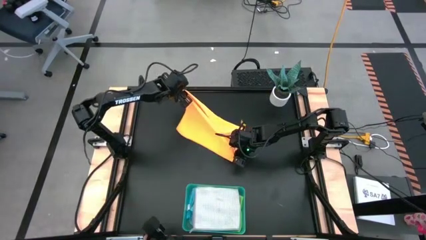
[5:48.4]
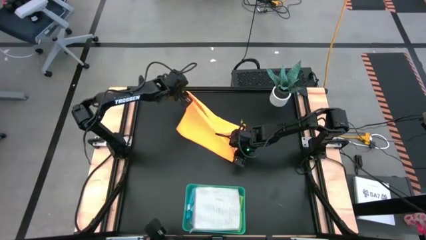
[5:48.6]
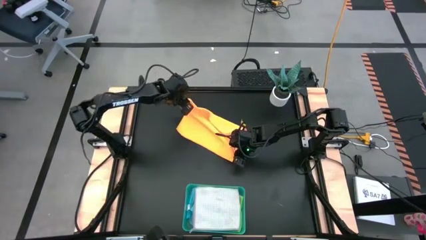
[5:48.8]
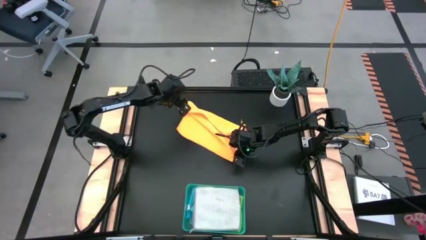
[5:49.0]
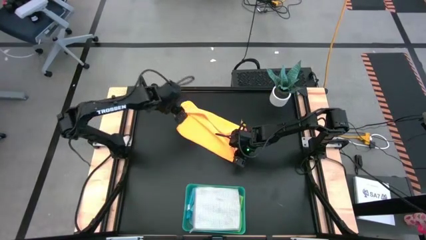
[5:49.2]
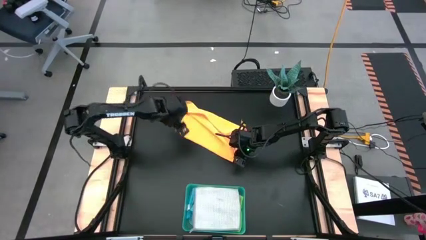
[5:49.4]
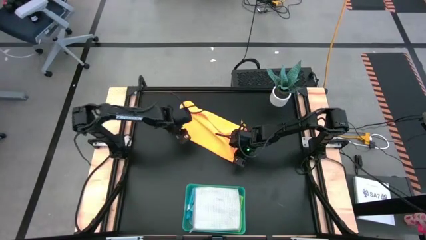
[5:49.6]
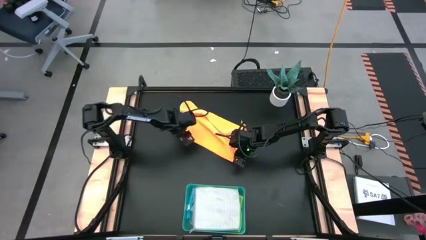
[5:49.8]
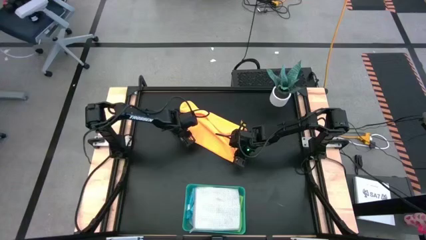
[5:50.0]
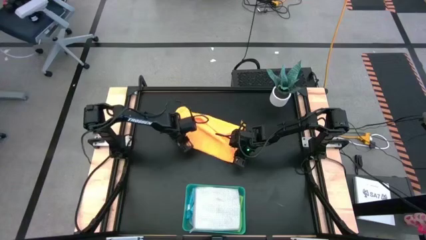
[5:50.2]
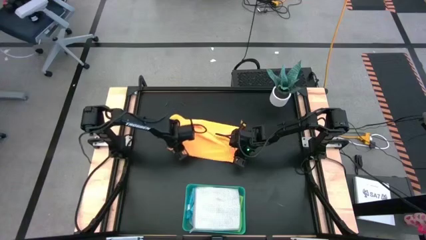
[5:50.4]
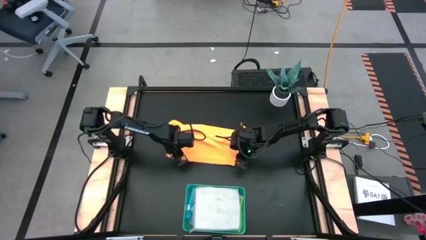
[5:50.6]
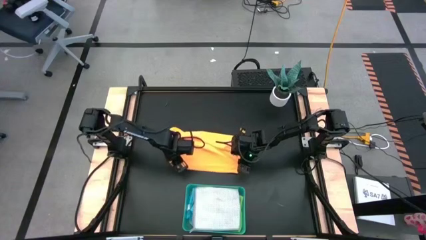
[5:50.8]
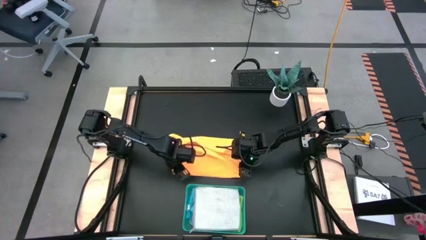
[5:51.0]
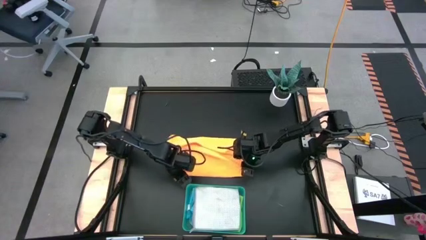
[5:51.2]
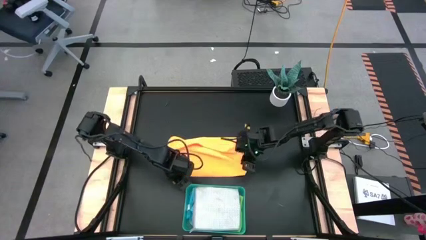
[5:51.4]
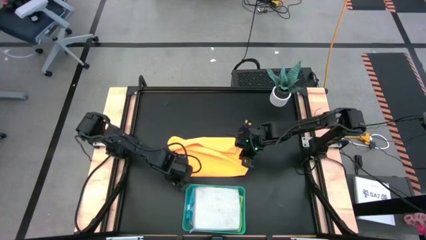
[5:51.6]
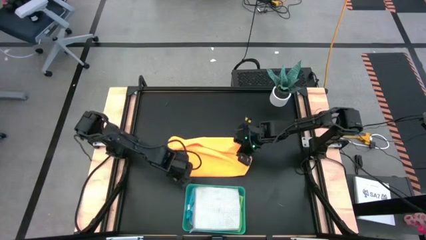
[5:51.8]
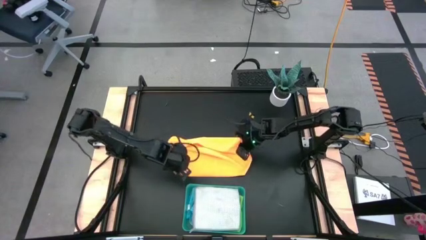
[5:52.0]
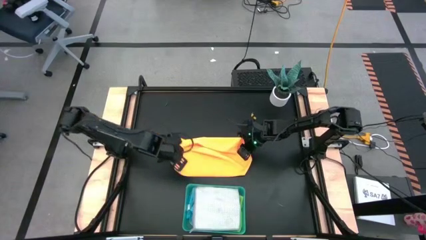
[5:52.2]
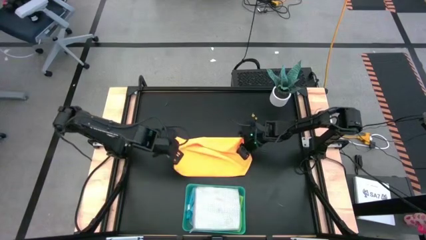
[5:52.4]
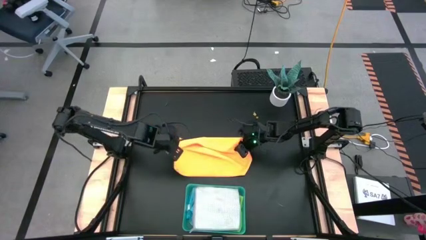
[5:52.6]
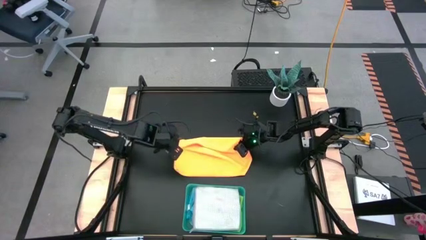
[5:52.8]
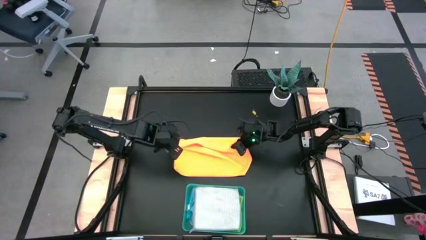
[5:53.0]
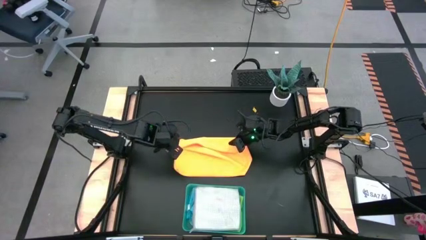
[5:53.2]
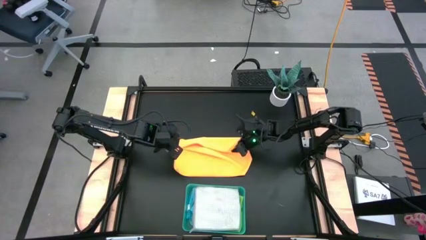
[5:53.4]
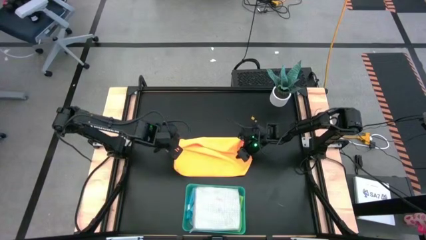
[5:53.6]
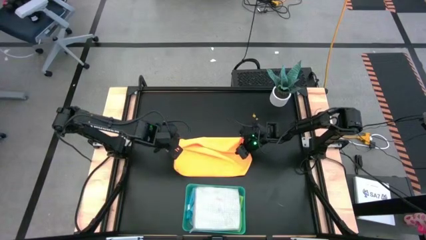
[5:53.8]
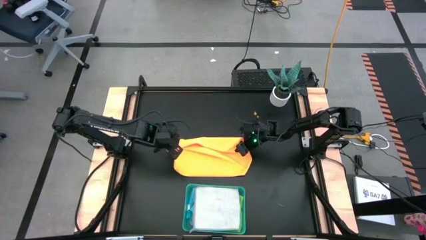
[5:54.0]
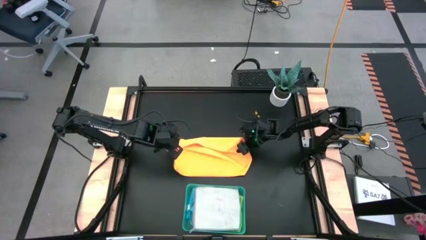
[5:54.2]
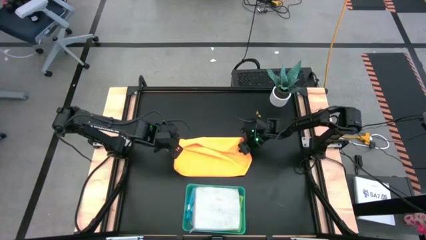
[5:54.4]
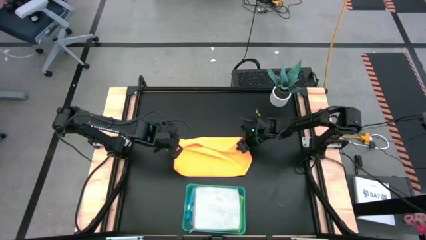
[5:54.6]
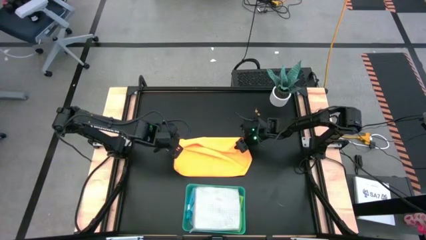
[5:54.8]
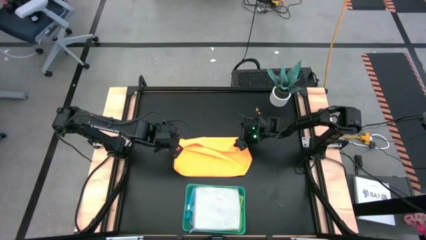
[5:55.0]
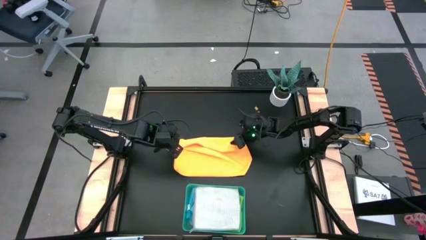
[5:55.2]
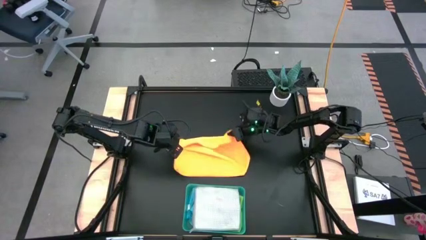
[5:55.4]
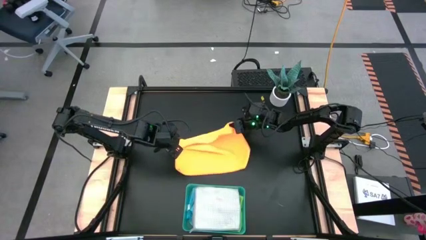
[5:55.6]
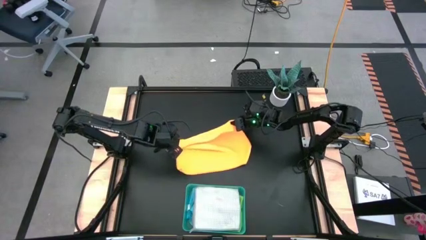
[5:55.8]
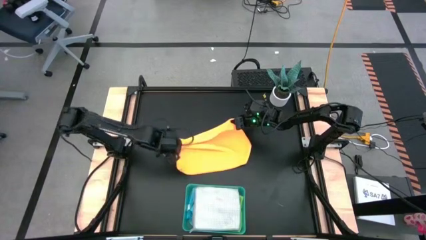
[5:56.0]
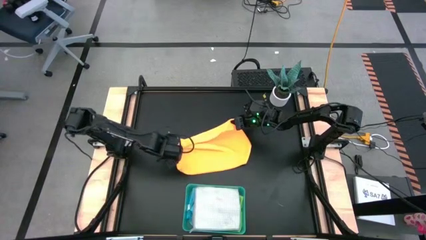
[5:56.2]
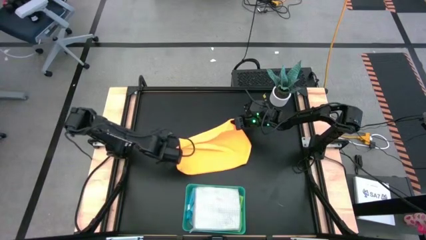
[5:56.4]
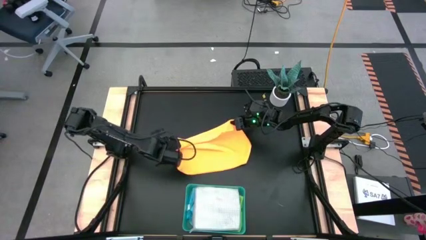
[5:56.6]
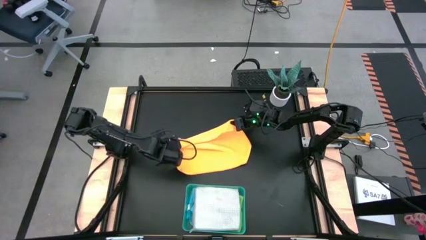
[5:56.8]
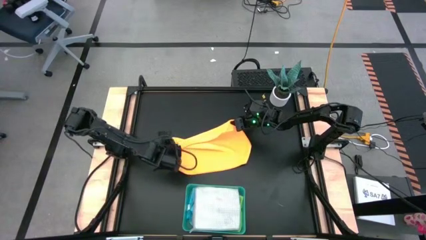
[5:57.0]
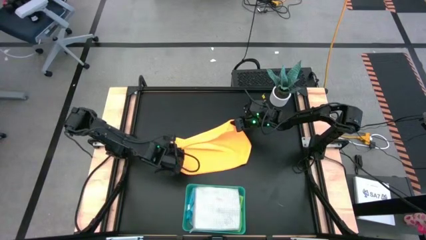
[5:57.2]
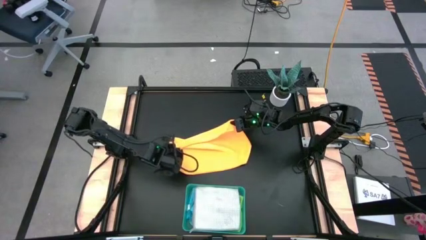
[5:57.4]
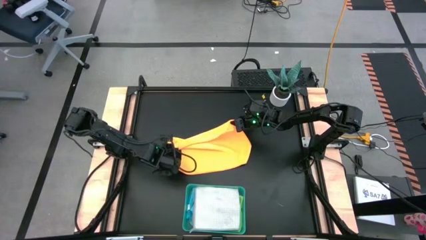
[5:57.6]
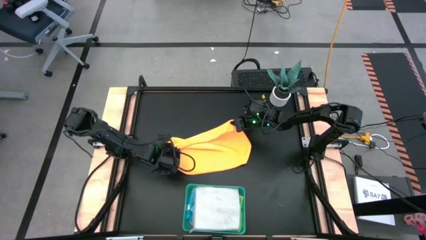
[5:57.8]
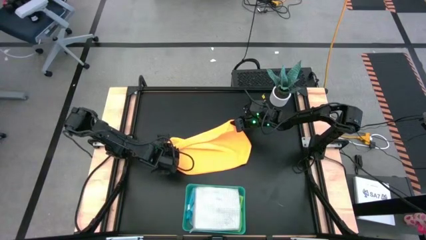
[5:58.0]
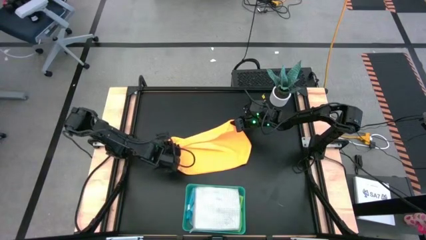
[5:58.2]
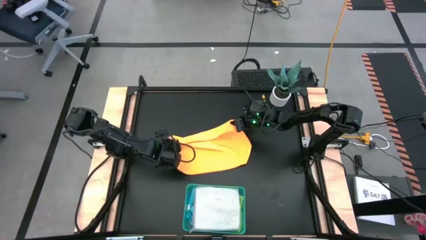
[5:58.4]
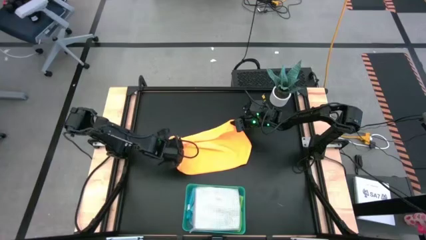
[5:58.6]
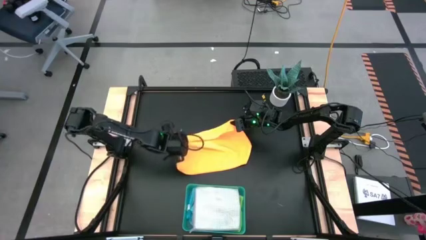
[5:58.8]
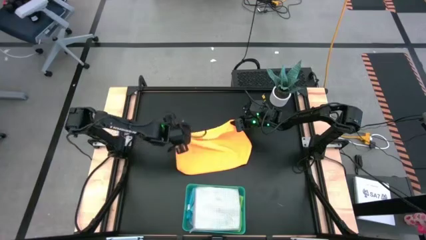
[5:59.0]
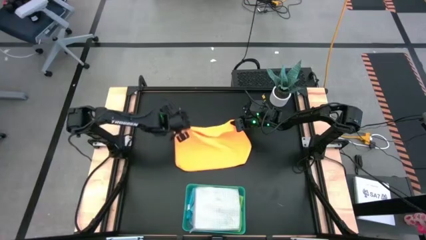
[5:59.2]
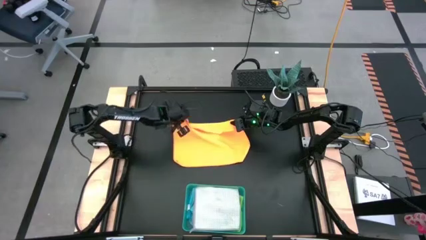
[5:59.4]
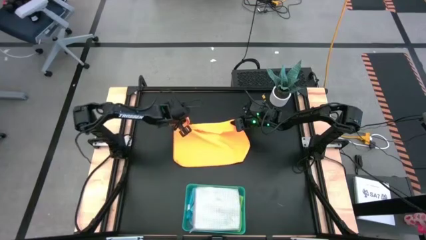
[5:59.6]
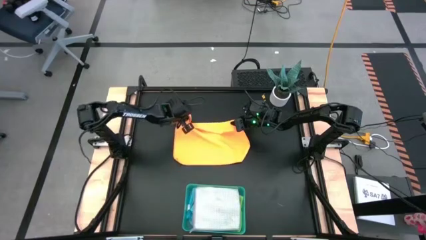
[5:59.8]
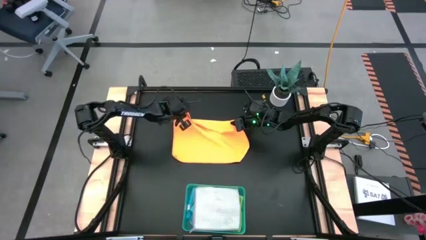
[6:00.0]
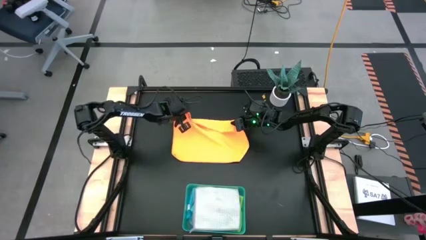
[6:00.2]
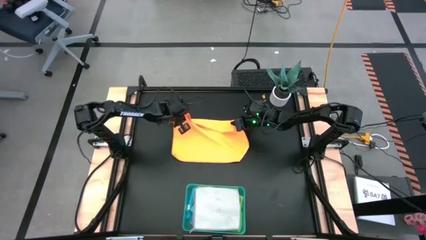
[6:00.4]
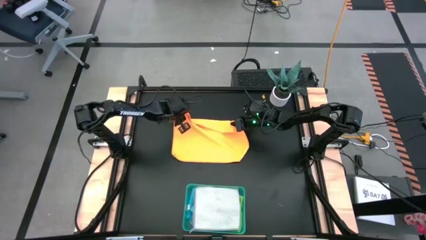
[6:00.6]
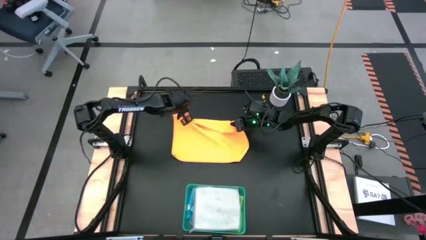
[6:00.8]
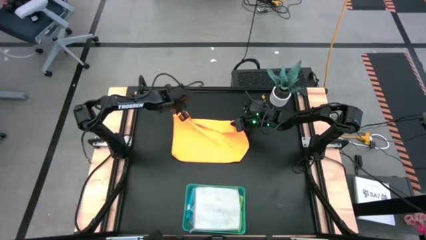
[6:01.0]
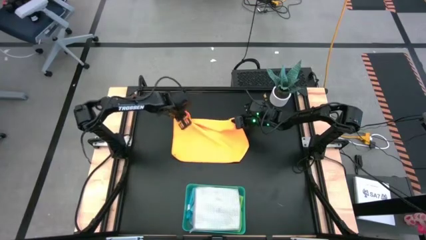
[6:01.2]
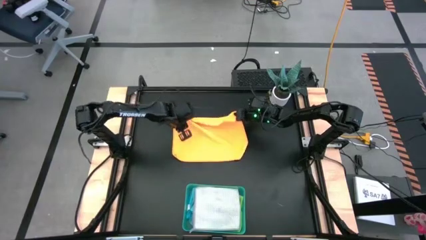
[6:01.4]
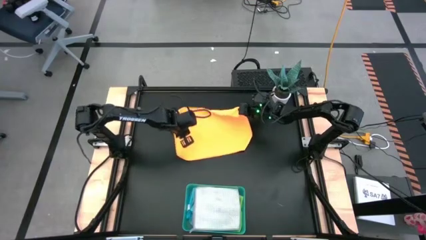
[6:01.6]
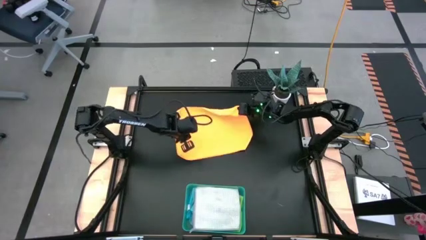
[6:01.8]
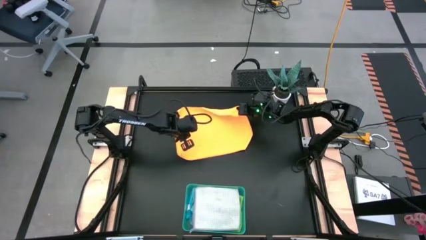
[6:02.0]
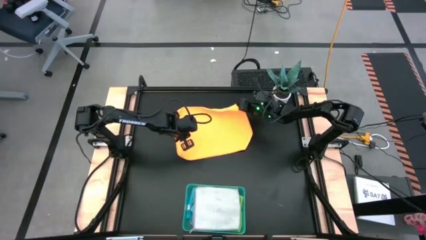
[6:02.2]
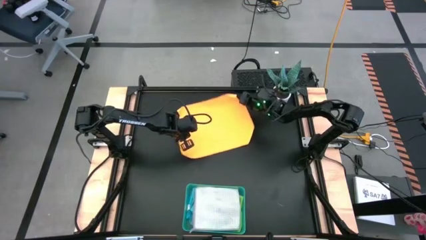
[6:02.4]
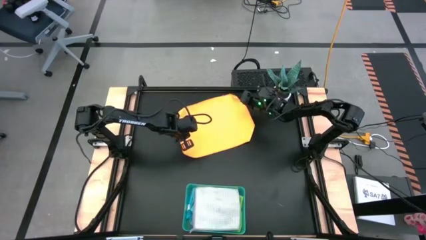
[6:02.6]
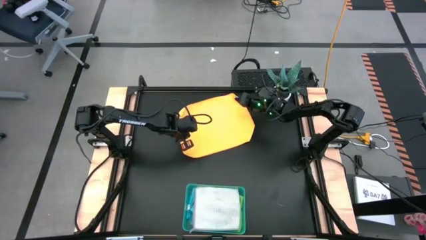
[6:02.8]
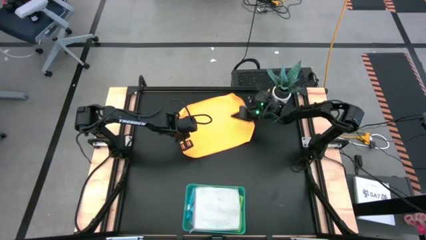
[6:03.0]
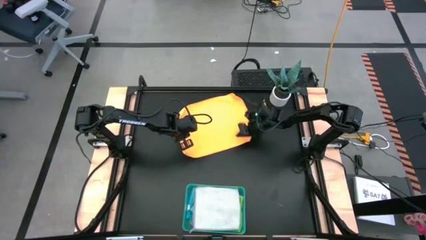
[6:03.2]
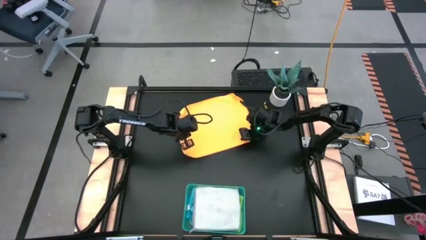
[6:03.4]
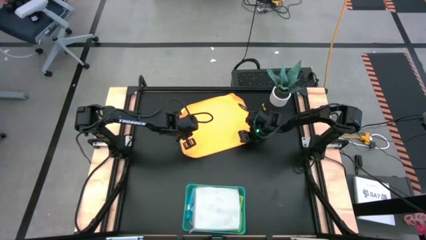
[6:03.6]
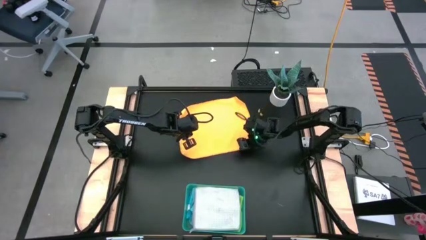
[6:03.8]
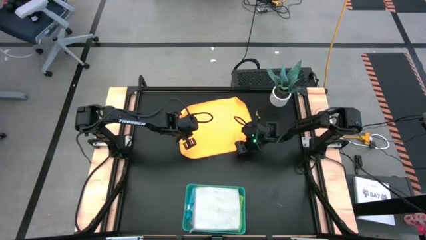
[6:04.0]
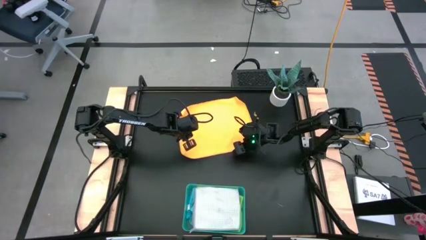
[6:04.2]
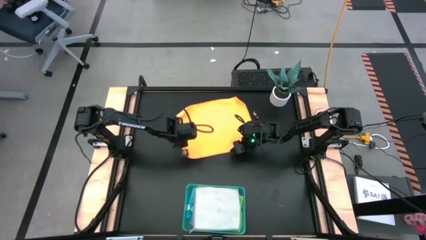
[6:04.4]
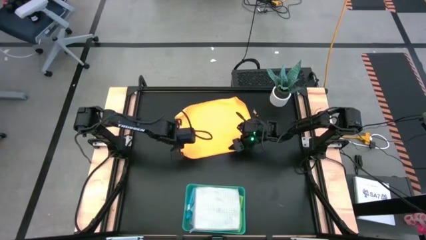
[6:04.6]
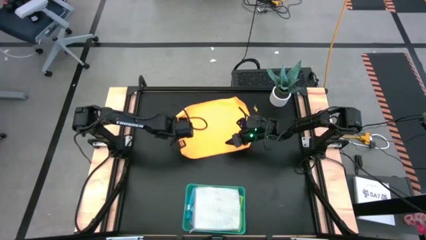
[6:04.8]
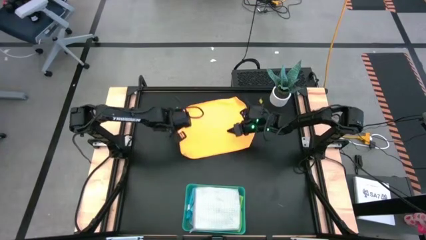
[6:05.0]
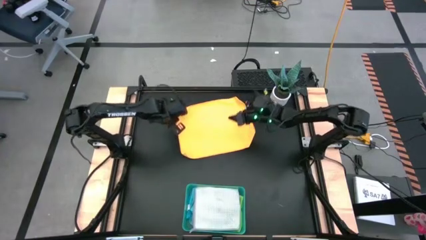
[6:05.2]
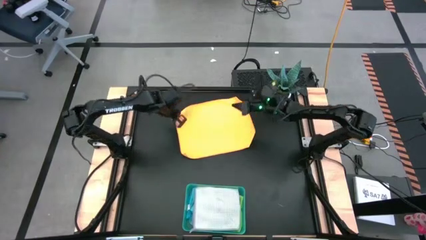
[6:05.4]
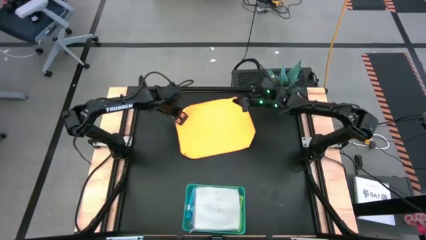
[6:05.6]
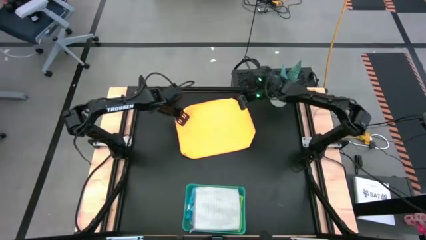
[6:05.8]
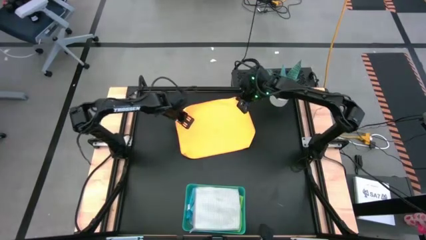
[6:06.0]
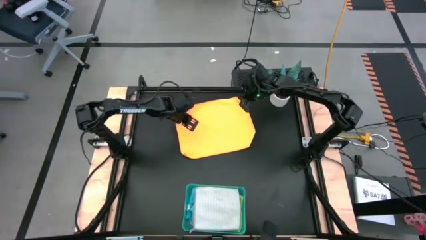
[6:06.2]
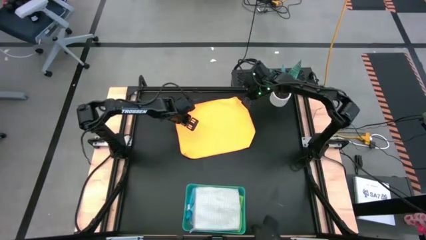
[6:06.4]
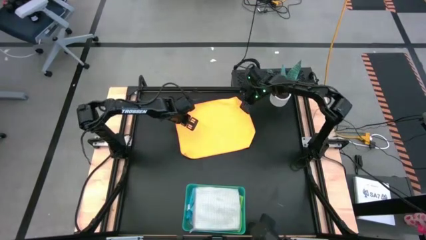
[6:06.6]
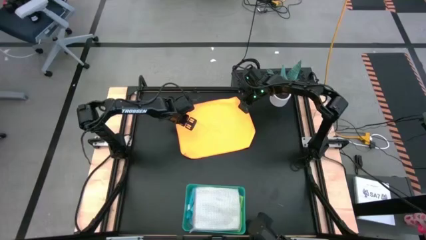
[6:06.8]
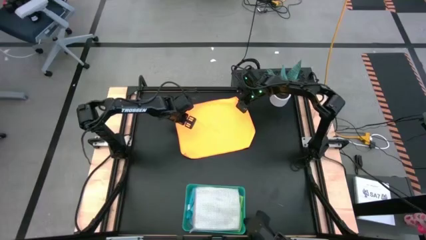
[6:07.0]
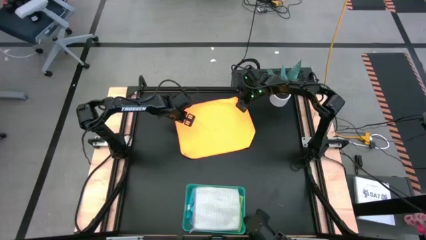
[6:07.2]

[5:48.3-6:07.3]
Task: Fold microfiber towels
Fold the orange microfiber cloth
